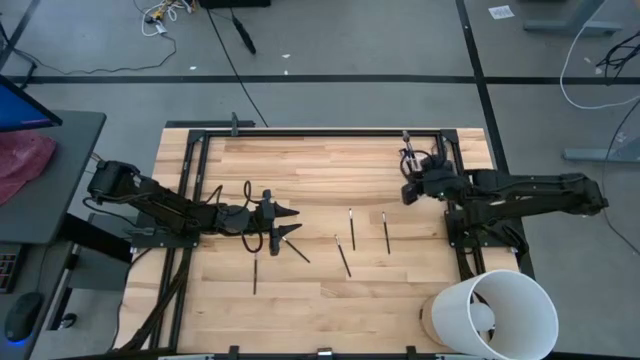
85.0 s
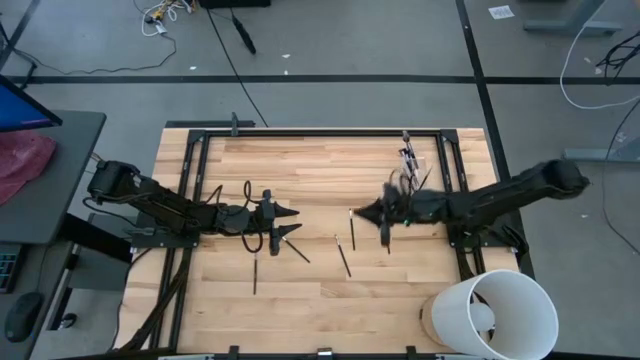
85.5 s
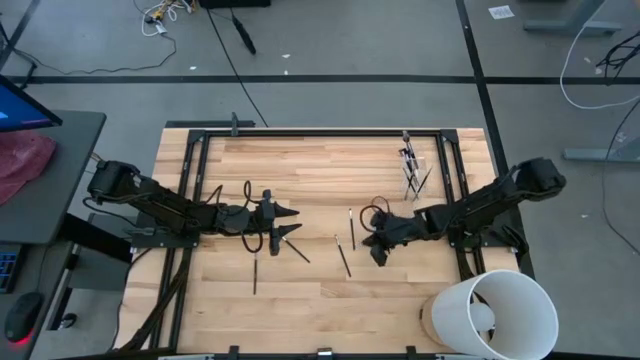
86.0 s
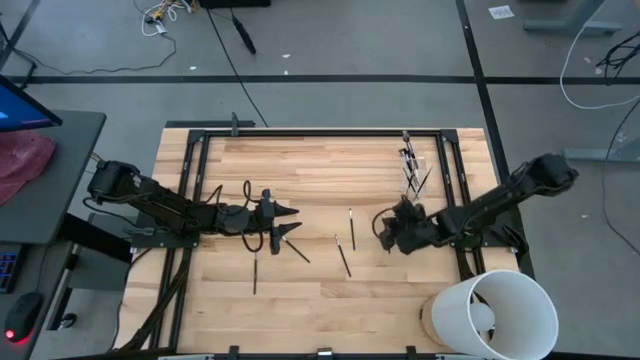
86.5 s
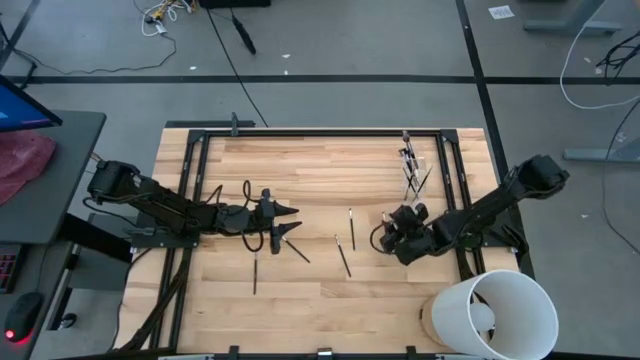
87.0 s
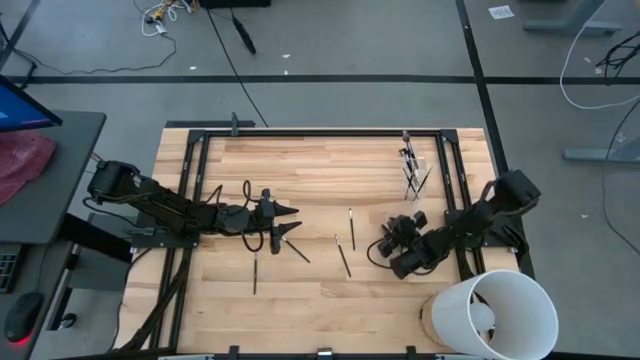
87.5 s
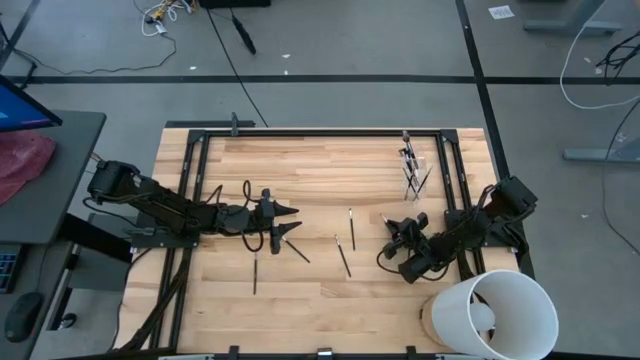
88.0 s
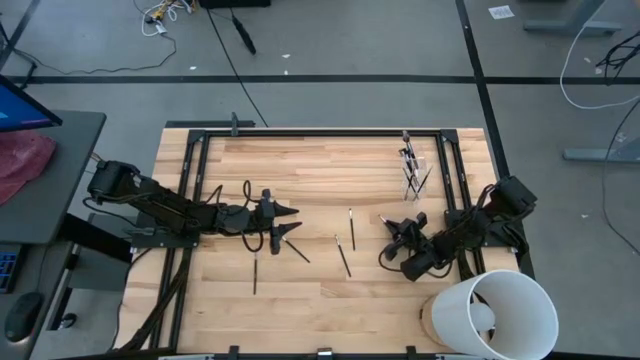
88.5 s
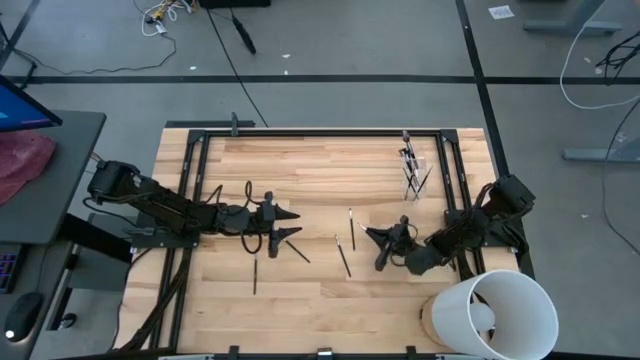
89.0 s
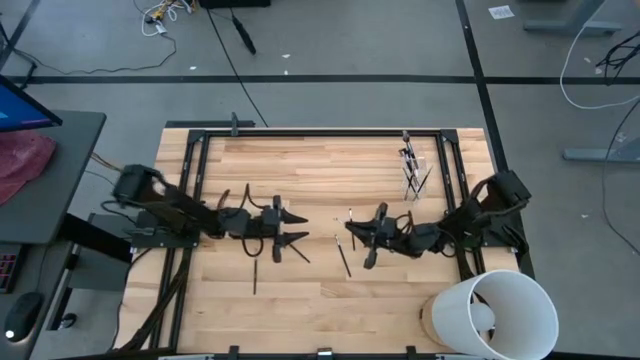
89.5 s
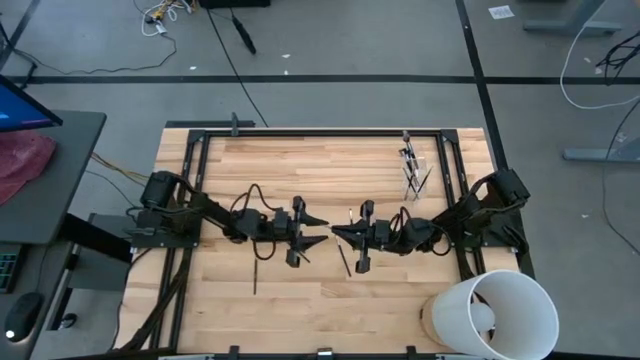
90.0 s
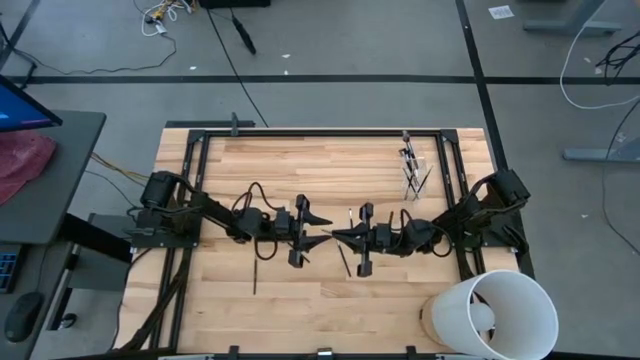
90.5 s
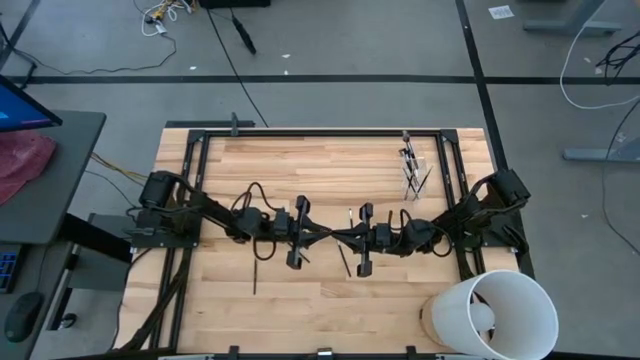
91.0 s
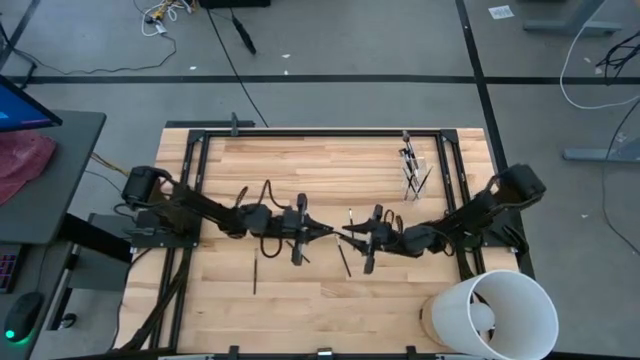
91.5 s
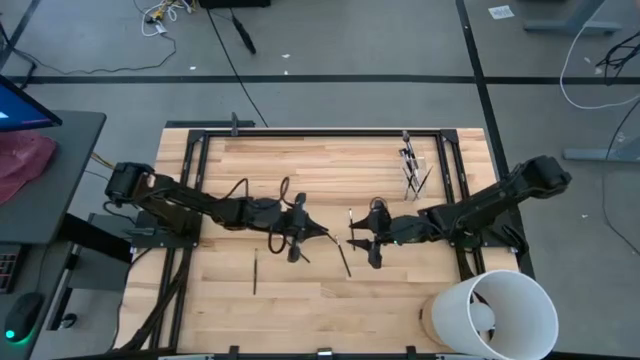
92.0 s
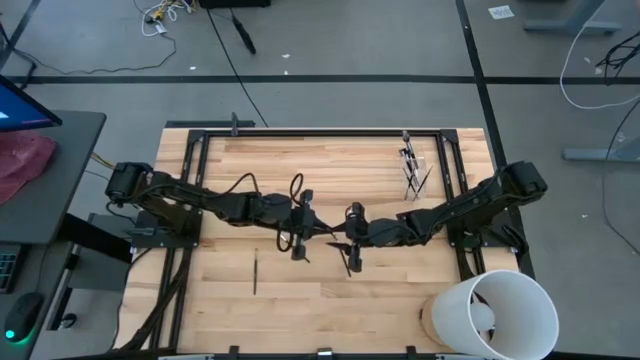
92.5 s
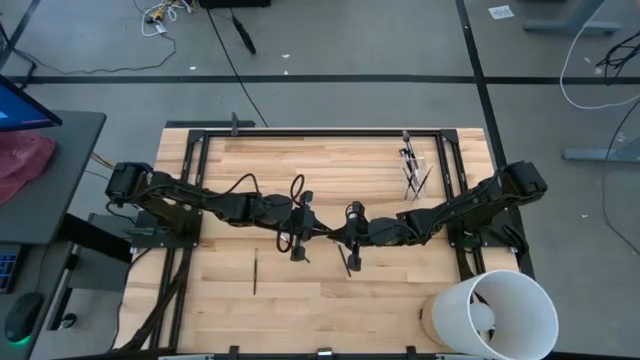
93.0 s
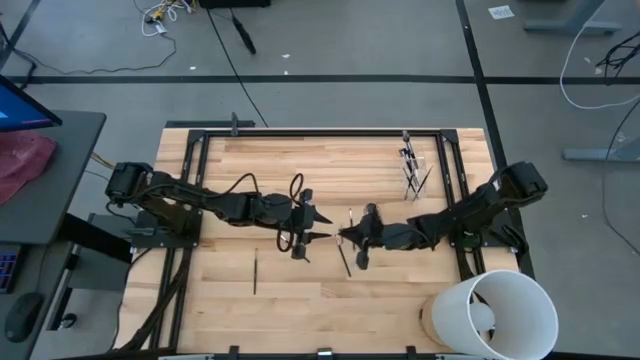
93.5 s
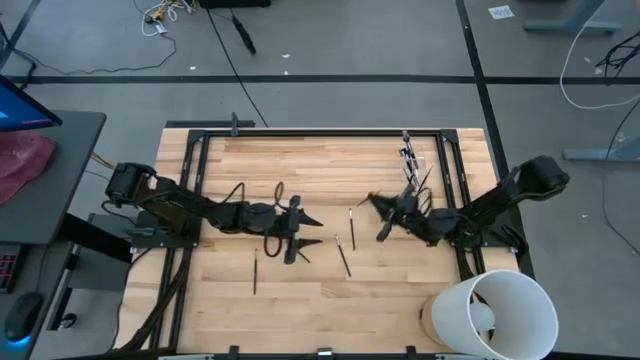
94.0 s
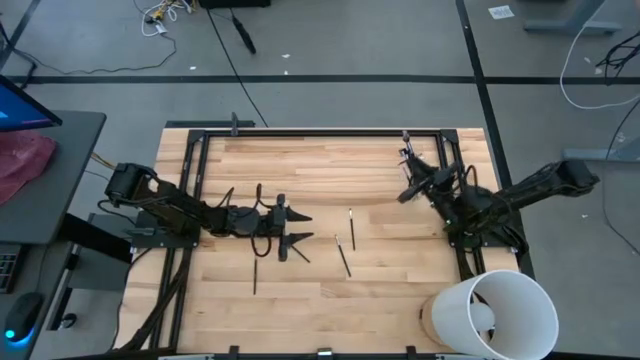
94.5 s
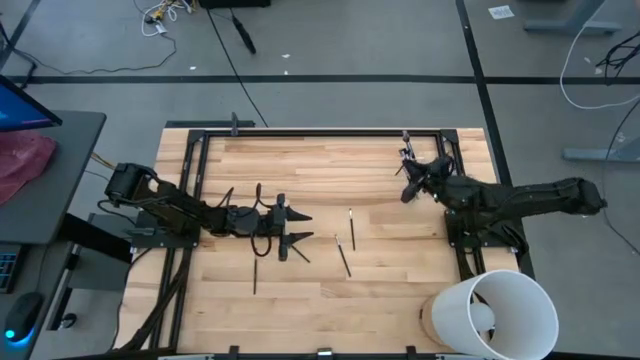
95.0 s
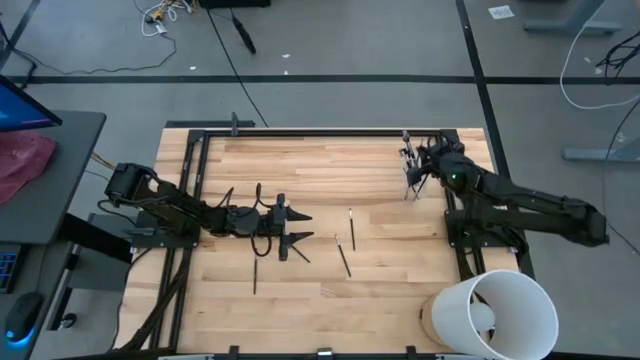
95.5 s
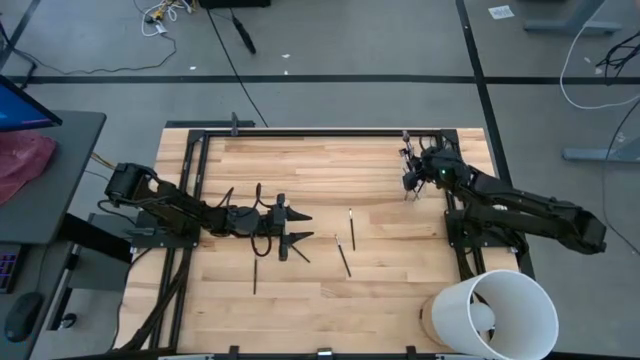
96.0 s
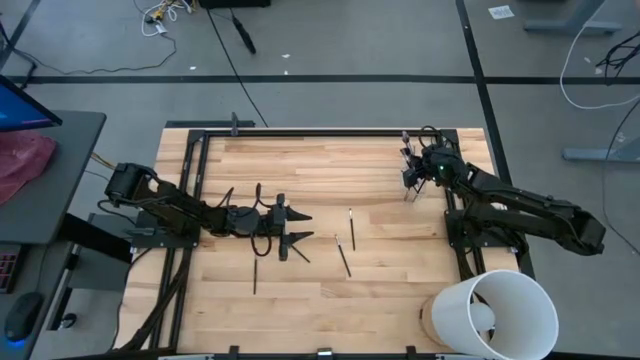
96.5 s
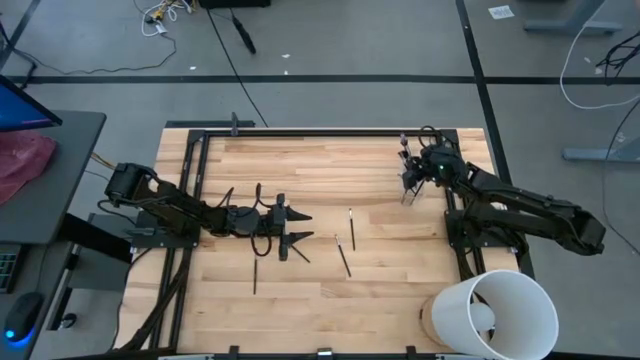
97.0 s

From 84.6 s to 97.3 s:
Task: Put items in baskets/containers
Put the eyeshadow brush into the transparent organizer

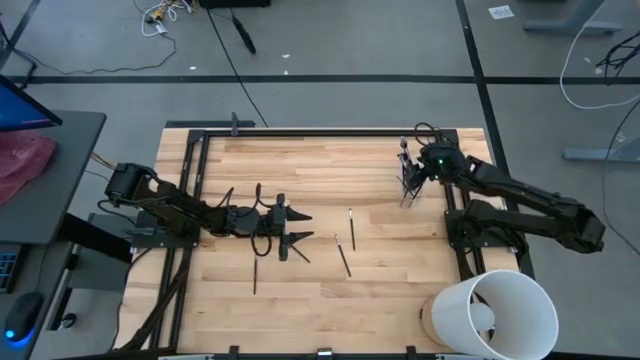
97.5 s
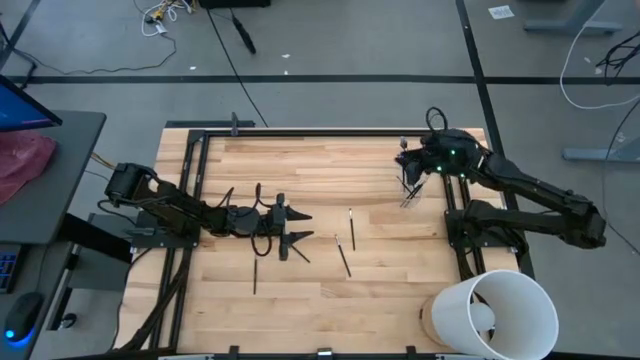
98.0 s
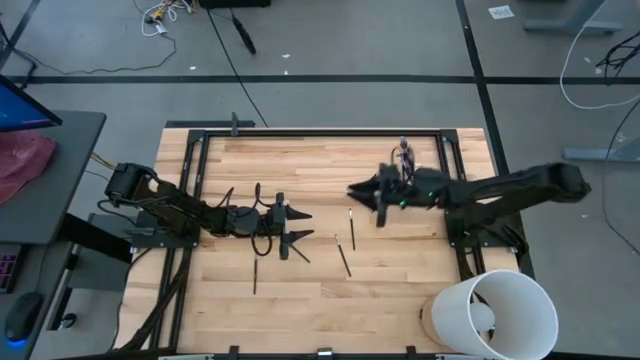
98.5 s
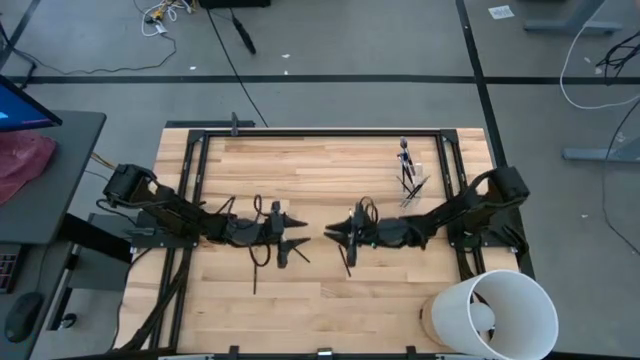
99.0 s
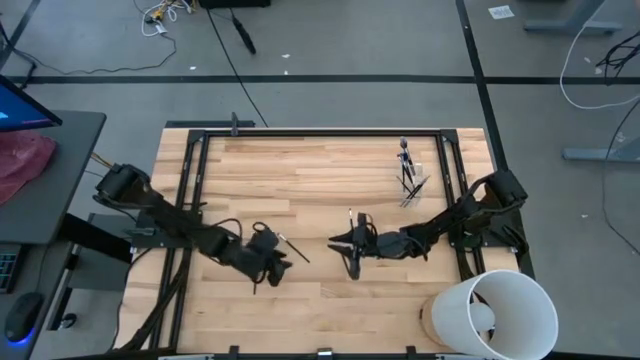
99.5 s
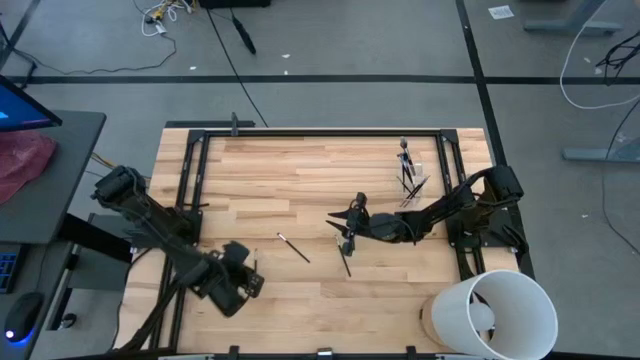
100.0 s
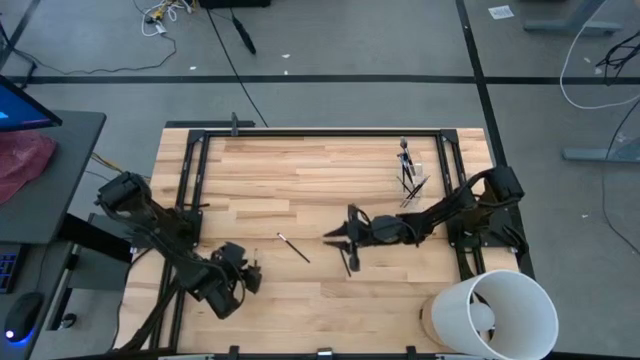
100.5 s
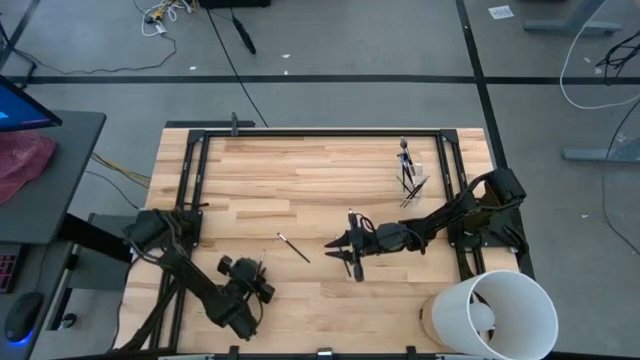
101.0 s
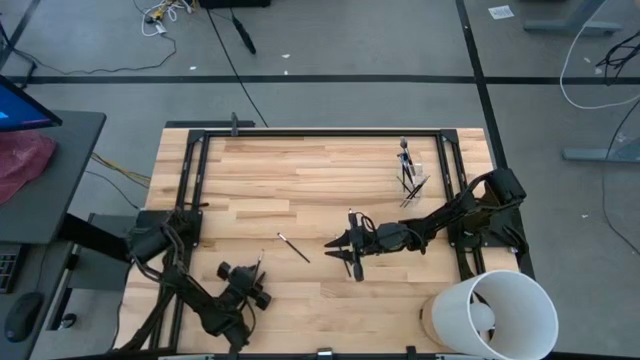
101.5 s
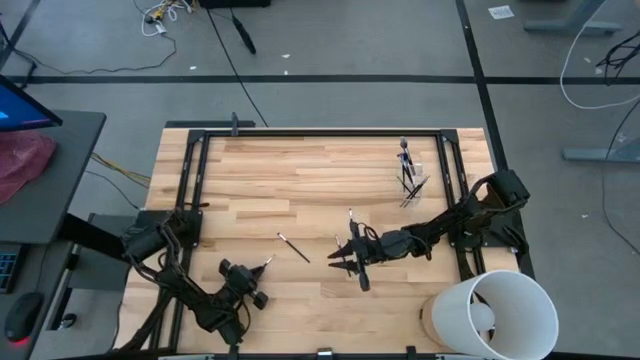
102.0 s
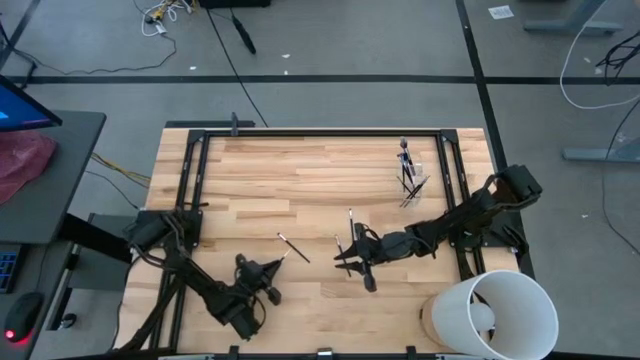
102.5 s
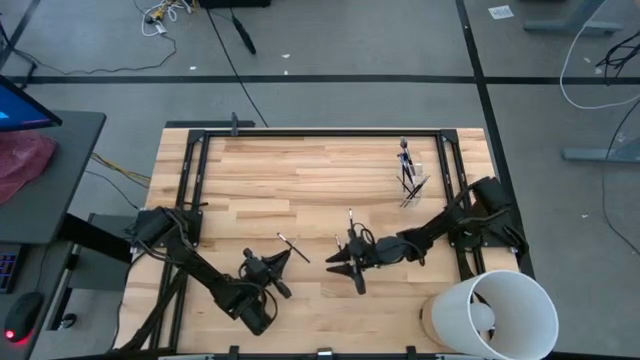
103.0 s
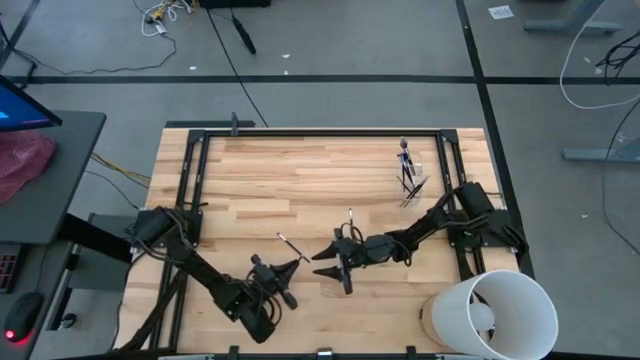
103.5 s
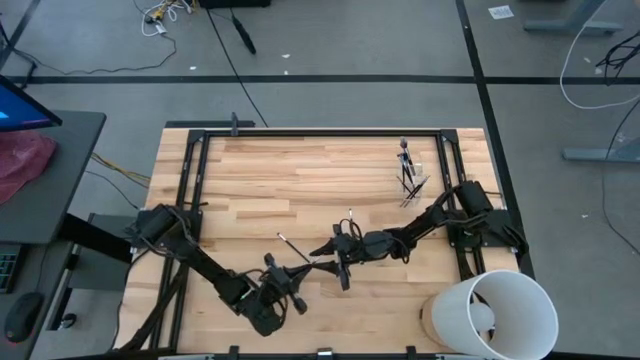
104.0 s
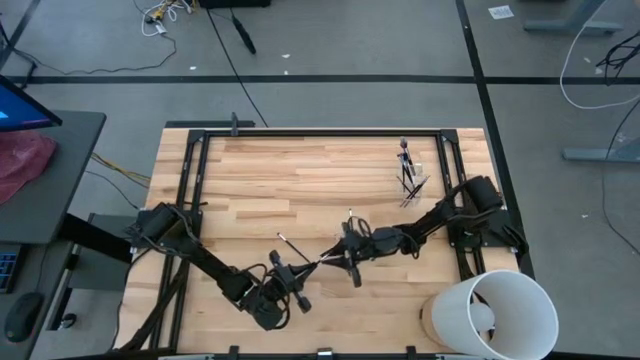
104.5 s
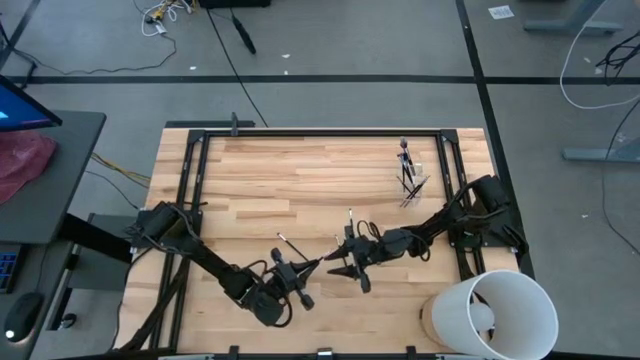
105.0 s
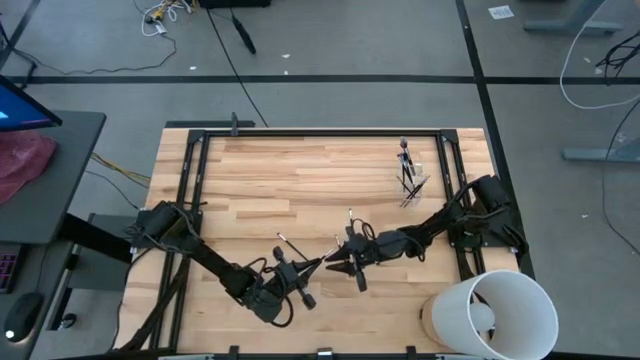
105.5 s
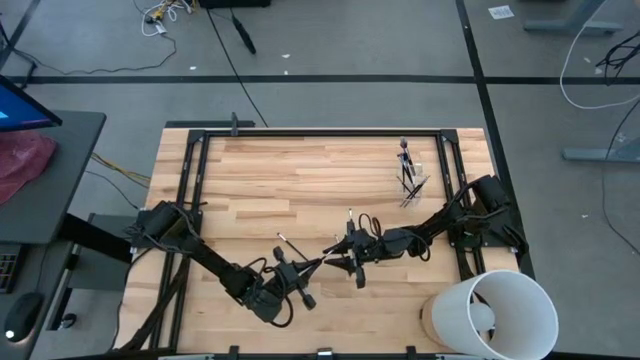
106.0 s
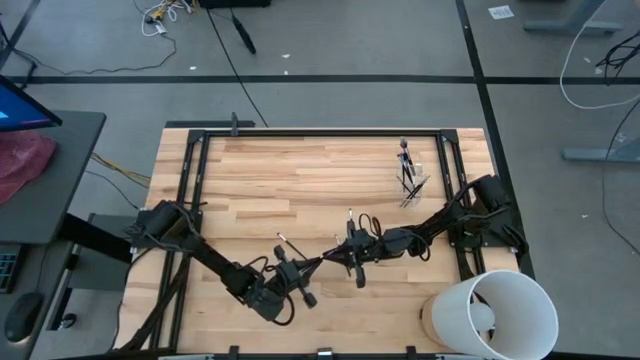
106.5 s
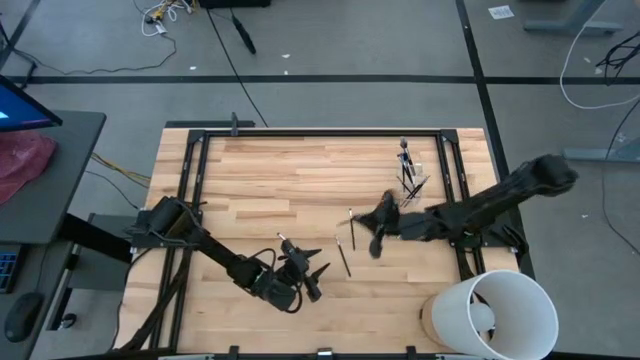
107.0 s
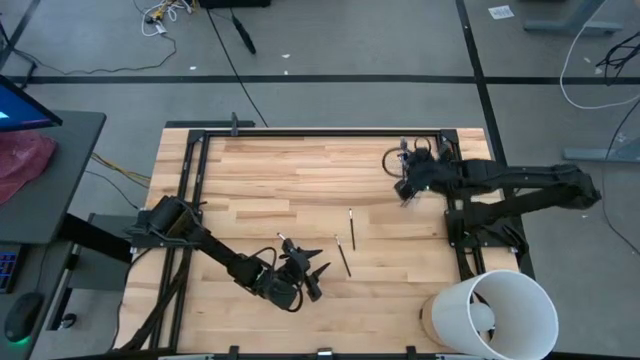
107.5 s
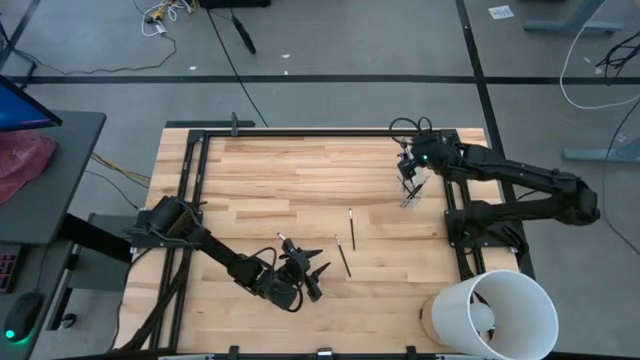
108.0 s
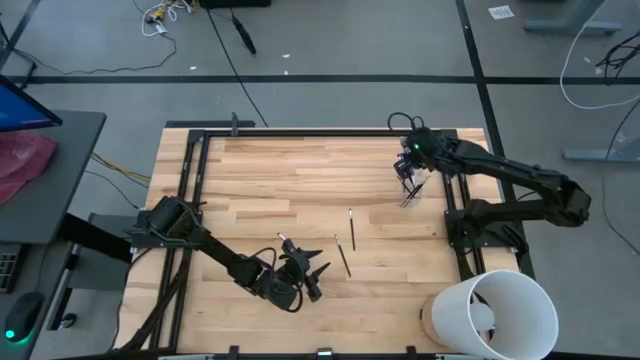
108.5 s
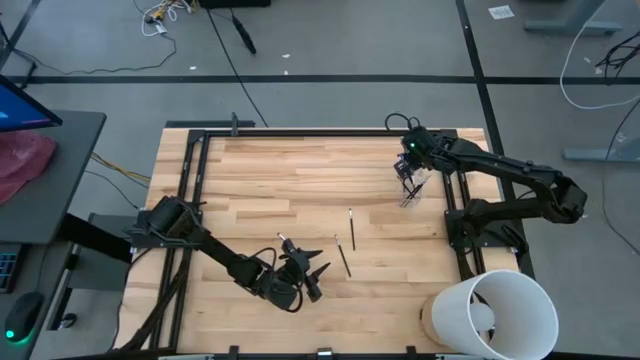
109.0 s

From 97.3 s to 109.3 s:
Put the eyeshadow brush into the transparent organizer
